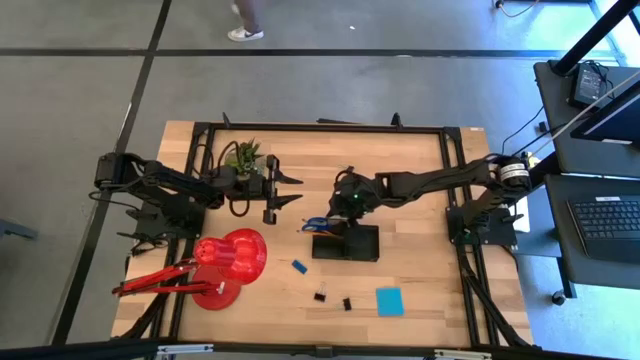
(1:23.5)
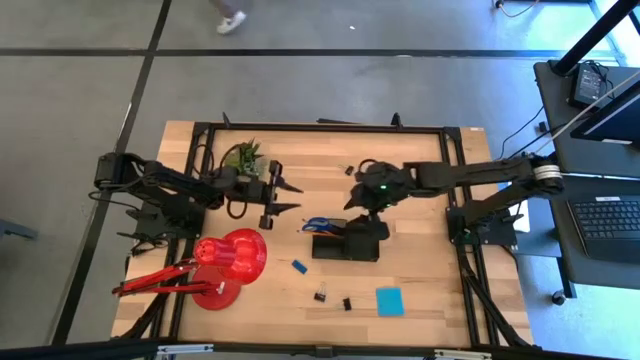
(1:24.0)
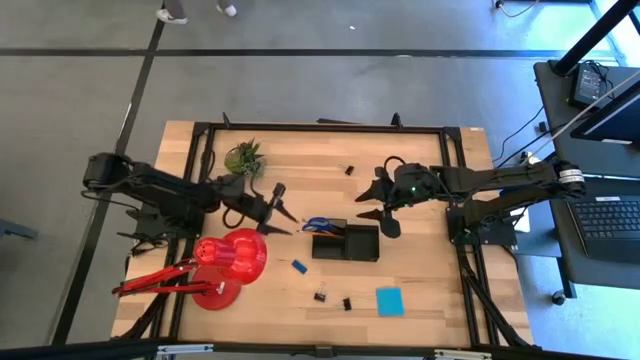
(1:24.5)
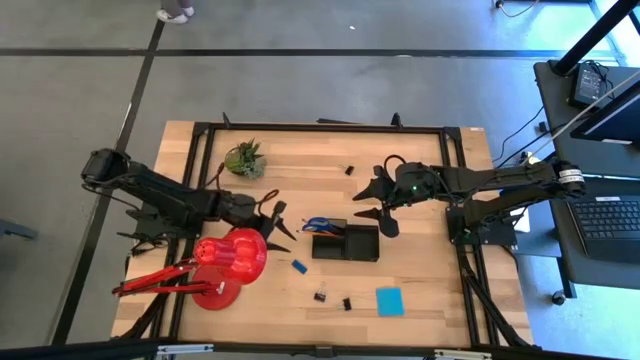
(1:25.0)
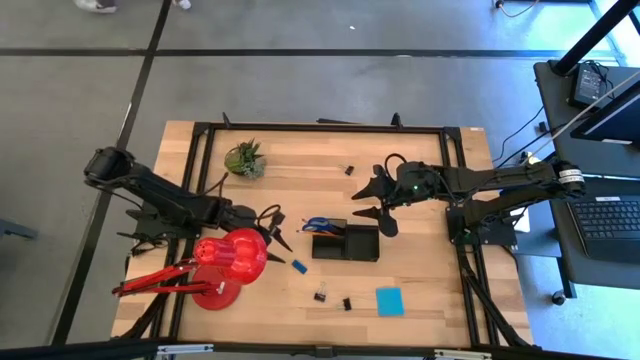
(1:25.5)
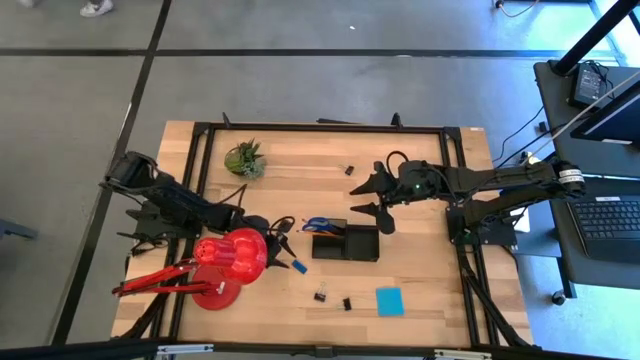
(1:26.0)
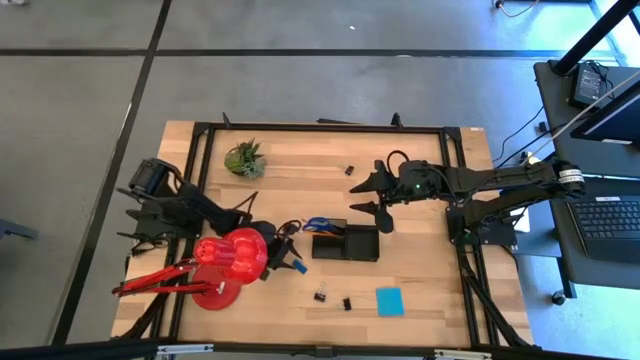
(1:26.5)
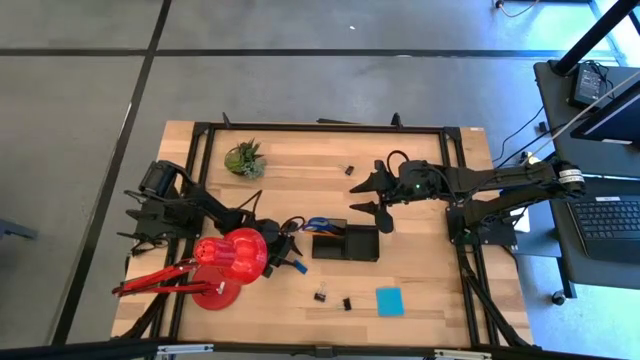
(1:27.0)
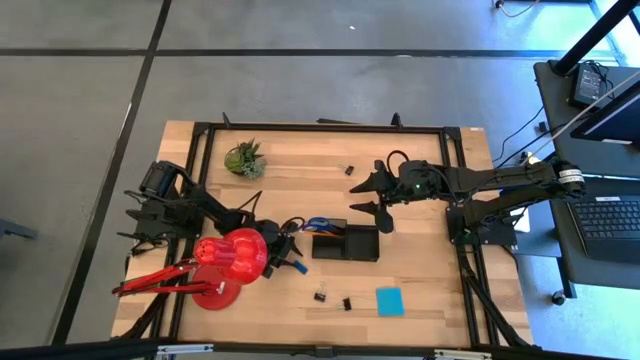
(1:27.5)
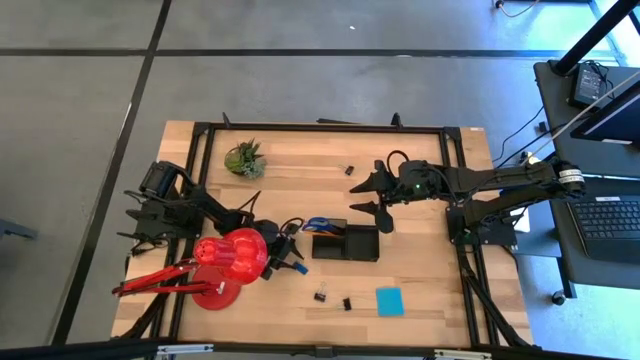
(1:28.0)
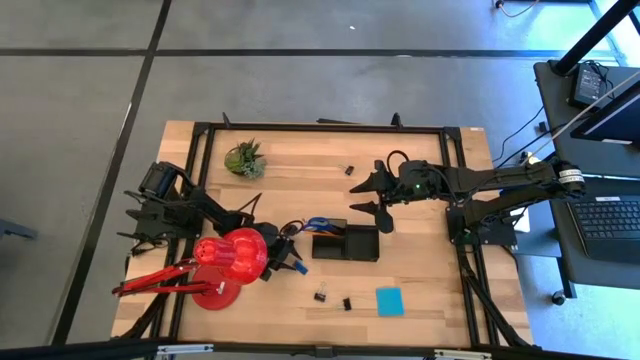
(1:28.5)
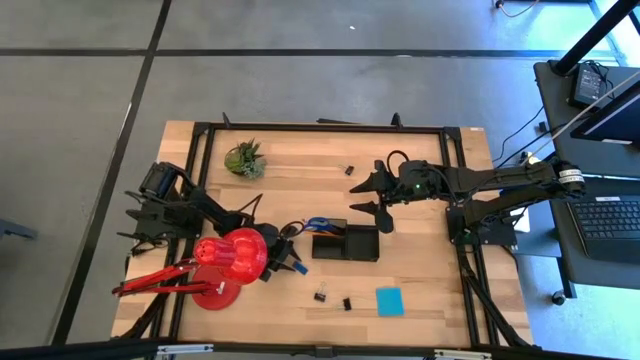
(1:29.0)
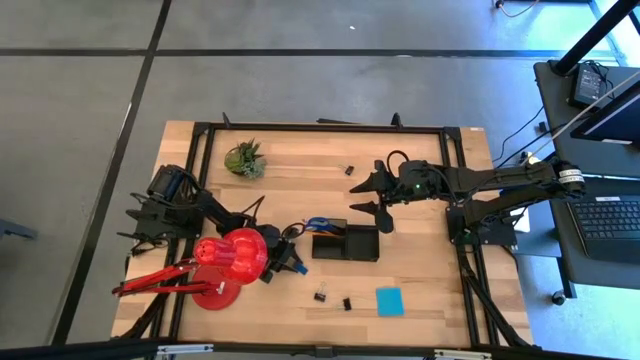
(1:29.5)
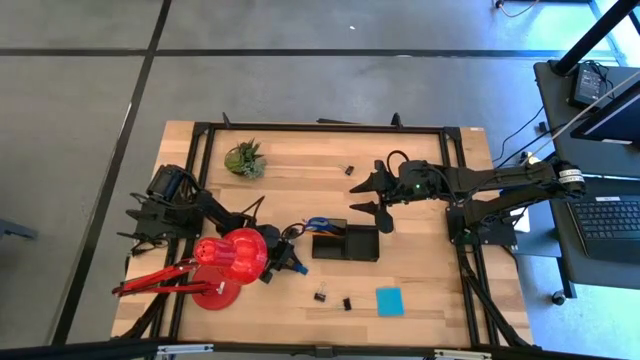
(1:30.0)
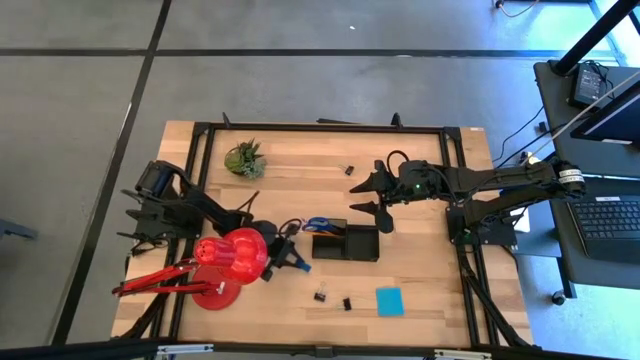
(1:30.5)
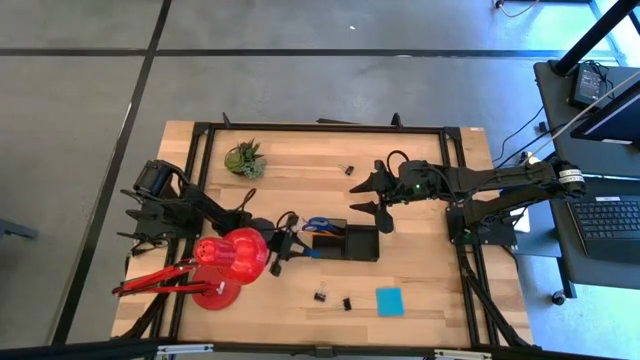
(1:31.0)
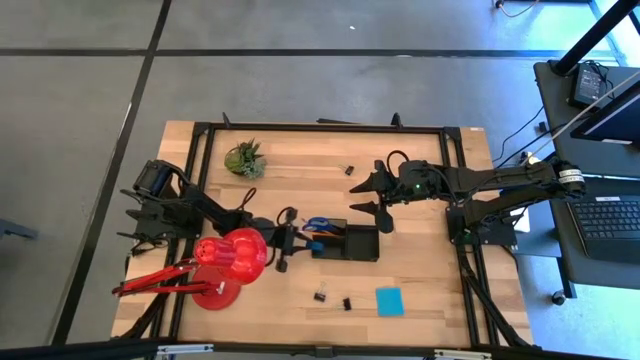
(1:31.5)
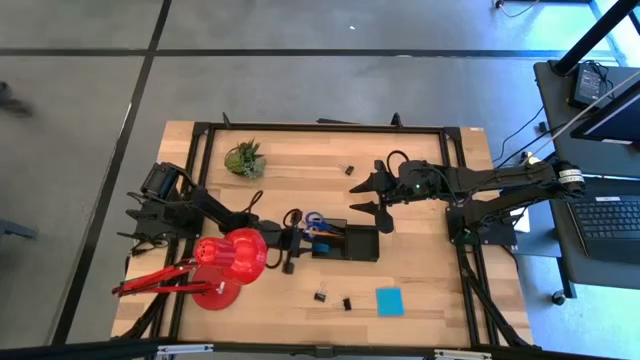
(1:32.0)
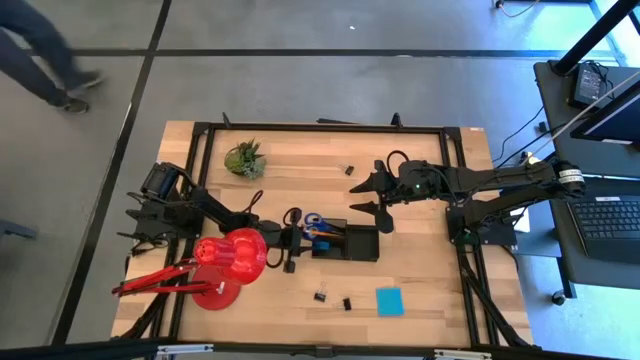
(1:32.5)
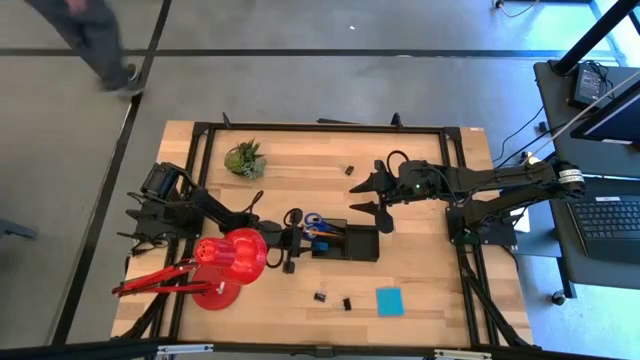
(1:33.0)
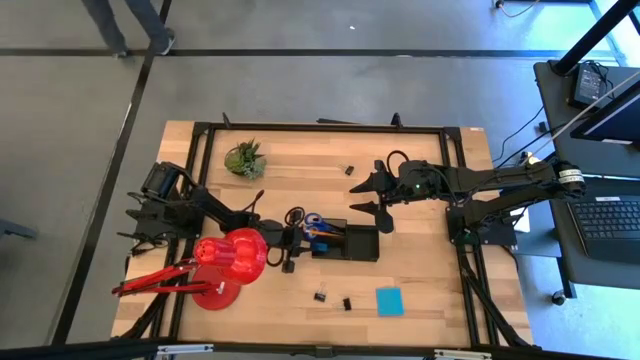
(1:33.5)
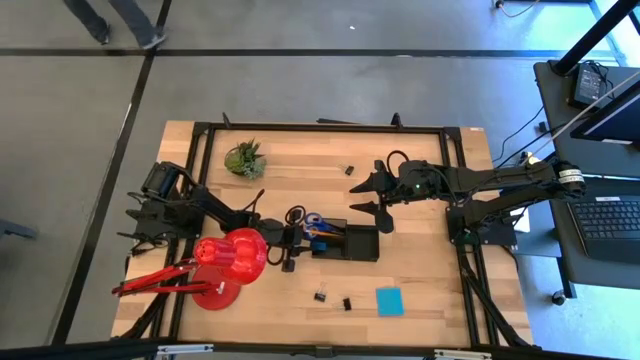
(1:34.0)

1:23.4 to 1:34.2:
Task: Pick and place office supplies into organizer
Put the blue eraser into the black desk organizer

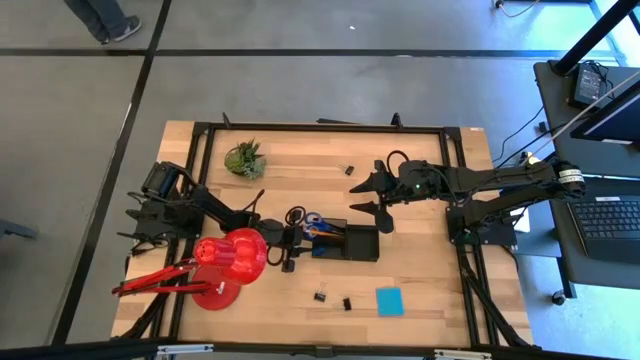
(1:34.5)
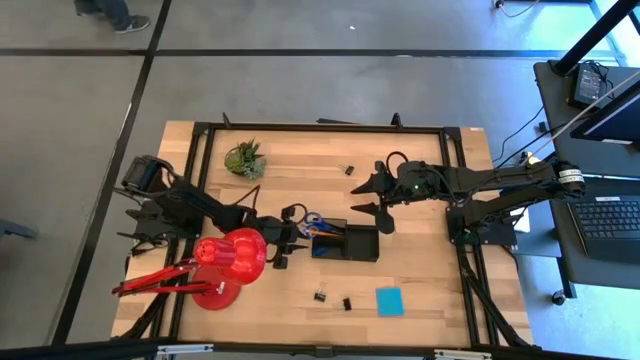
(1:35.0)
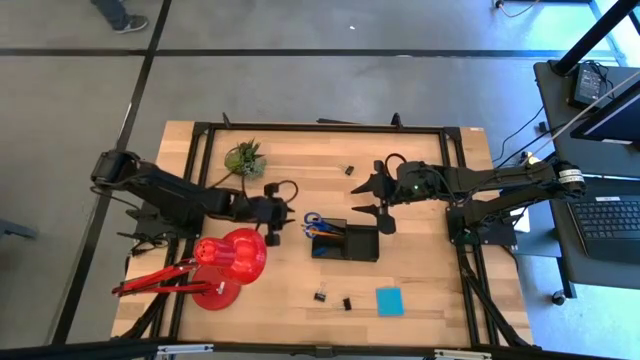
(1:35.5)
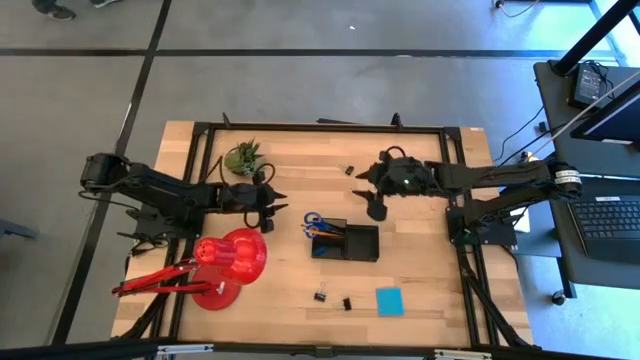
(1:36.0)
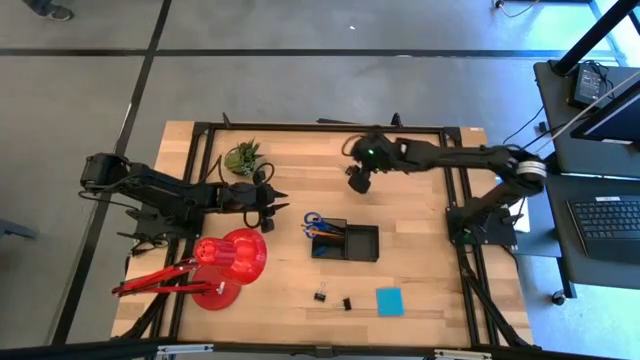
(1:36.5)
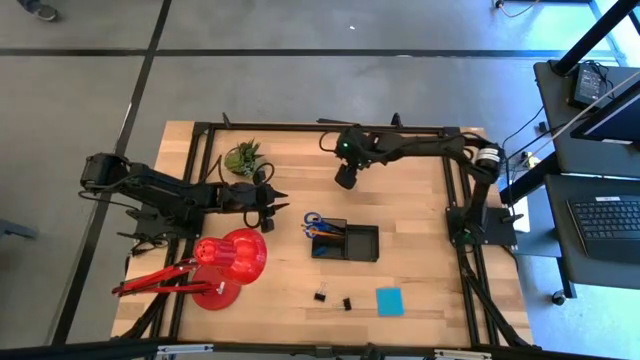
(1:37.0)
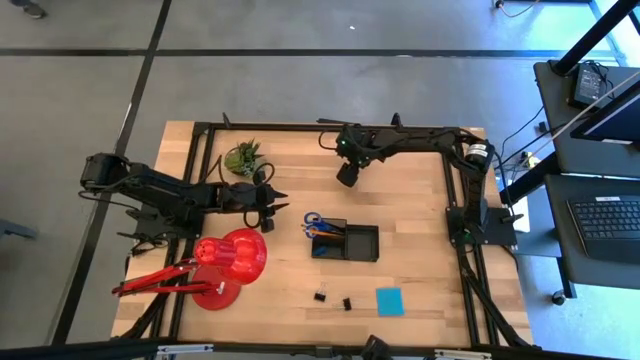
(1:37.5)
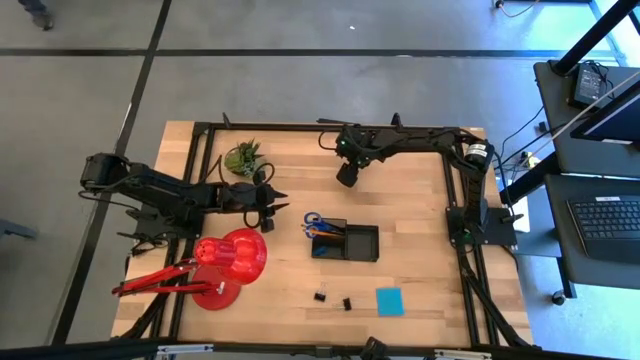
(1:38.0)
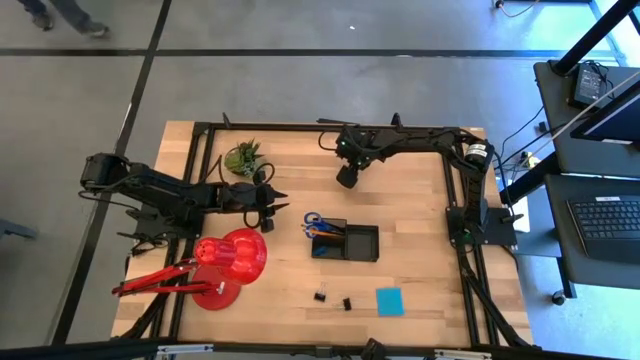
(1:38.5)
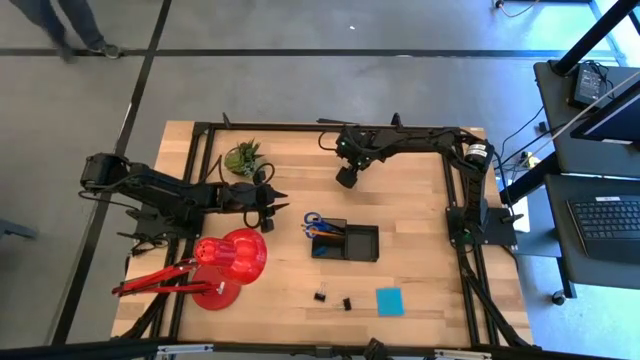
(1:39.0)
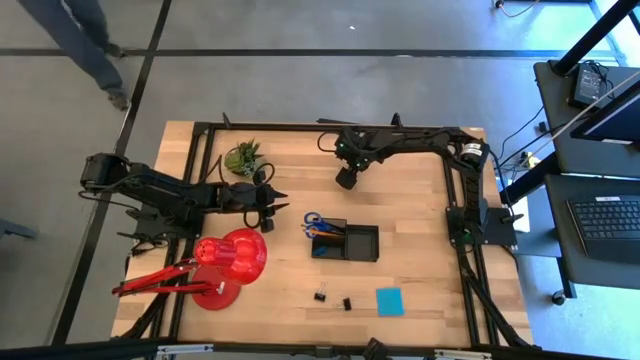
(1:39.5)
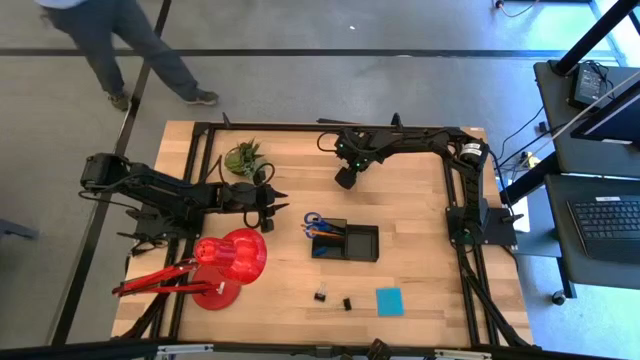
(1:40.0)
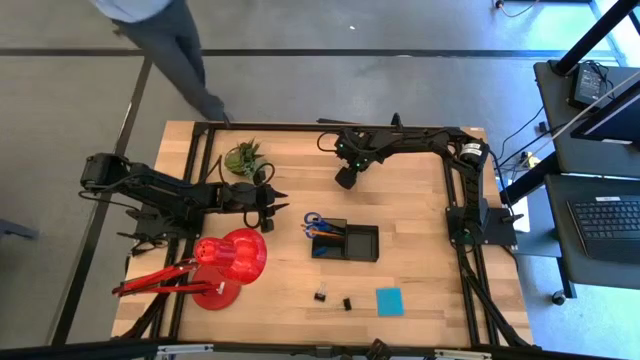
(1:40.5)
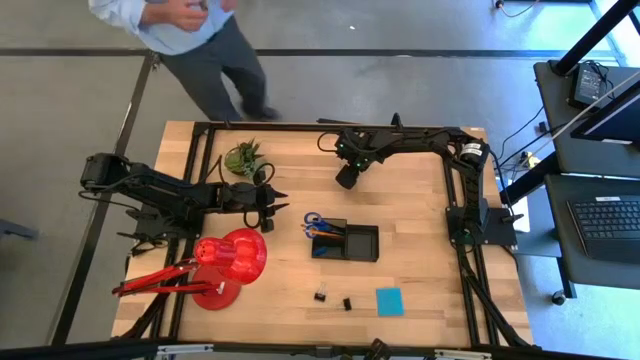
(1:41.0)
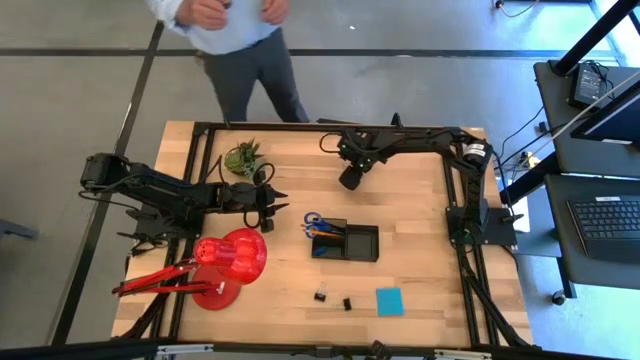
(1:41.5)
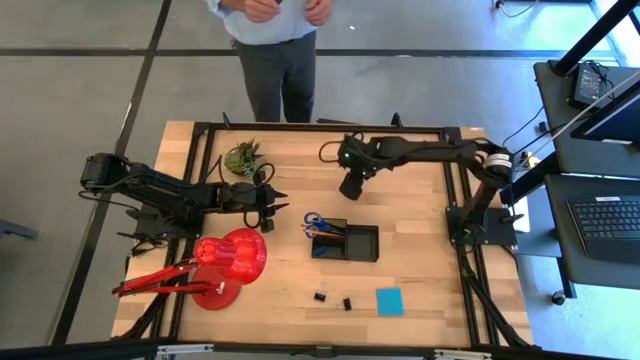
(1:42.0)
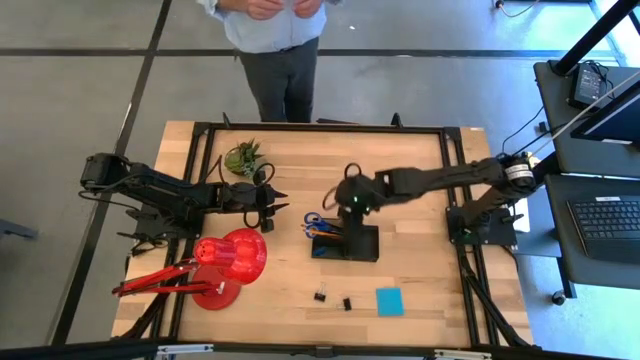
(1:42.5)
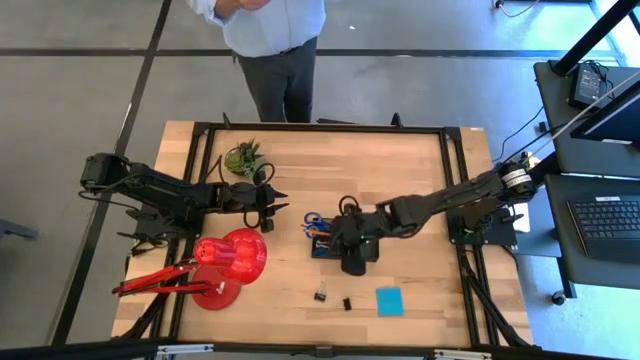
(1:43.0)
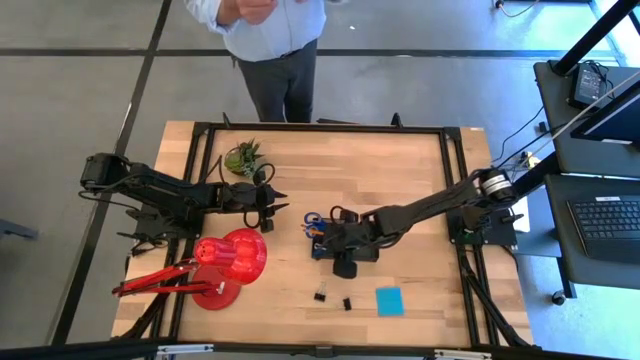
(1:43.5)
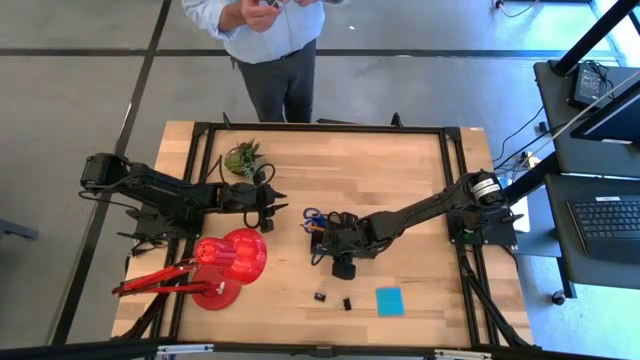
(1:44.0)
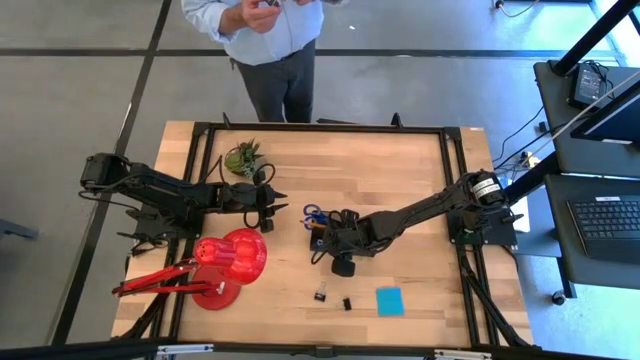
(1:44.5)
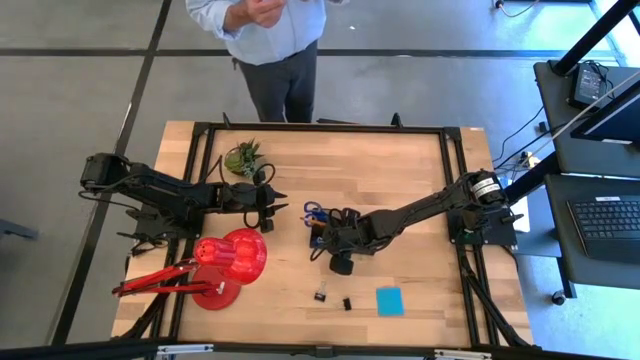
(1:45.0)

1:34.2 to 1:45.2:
Put the top black binder clip into the black desk organizer
